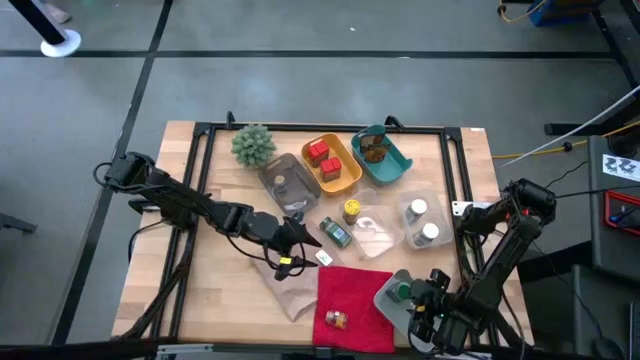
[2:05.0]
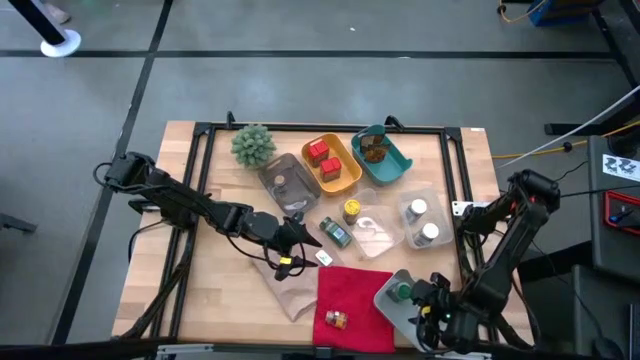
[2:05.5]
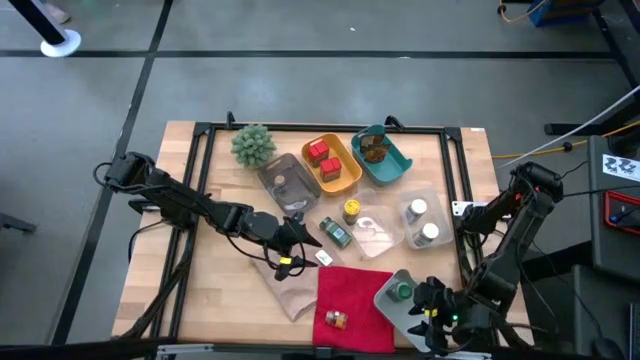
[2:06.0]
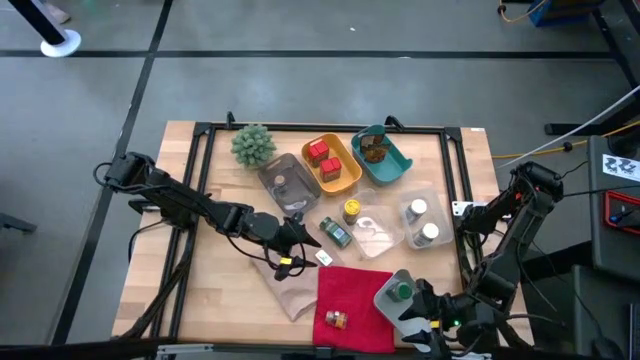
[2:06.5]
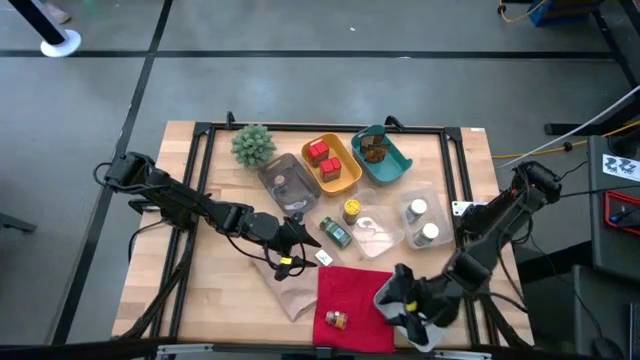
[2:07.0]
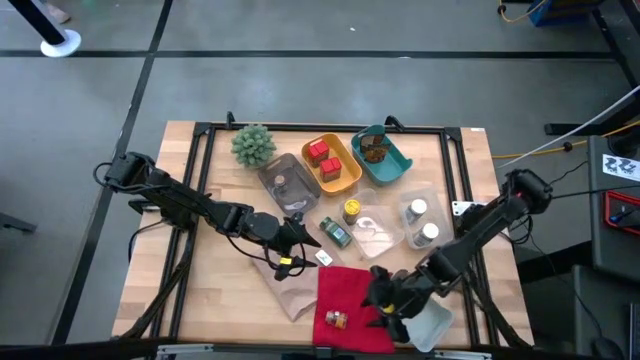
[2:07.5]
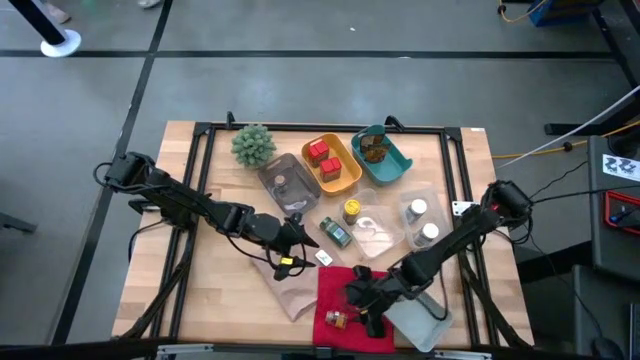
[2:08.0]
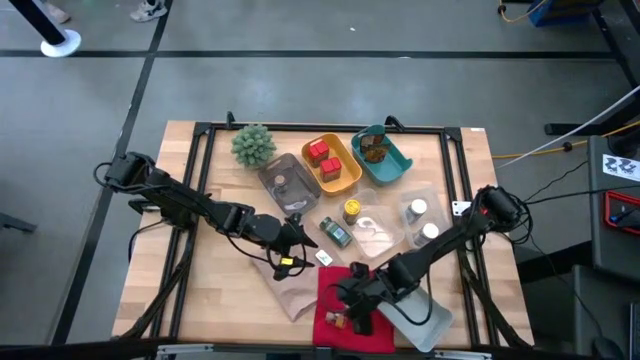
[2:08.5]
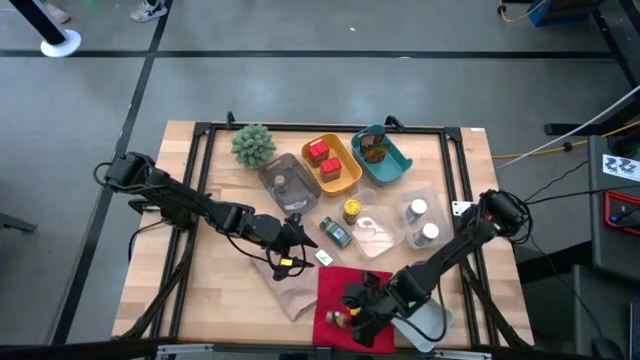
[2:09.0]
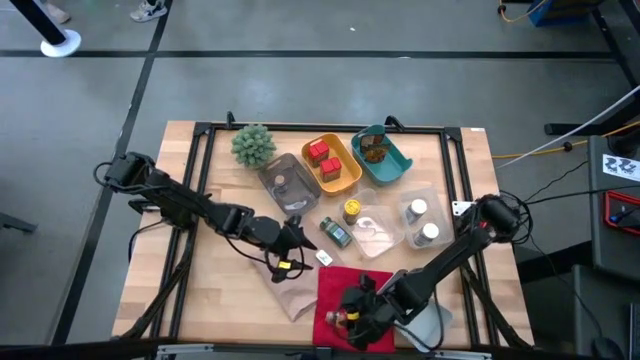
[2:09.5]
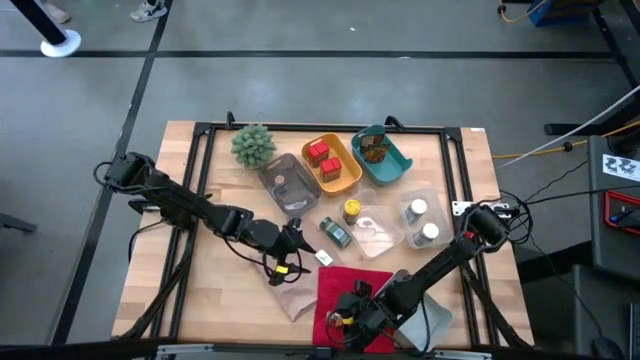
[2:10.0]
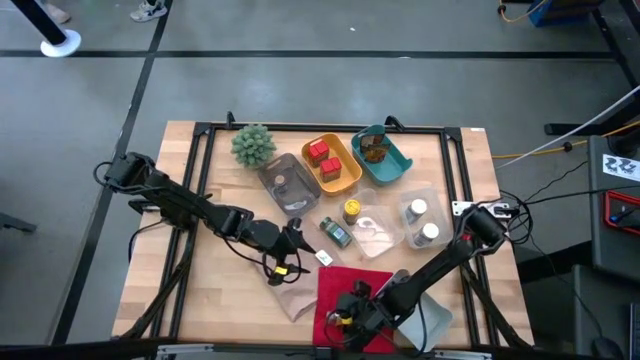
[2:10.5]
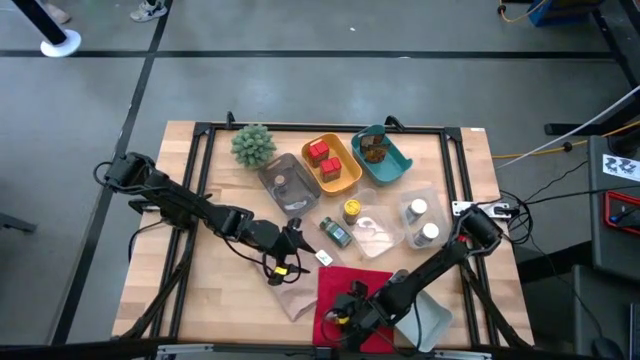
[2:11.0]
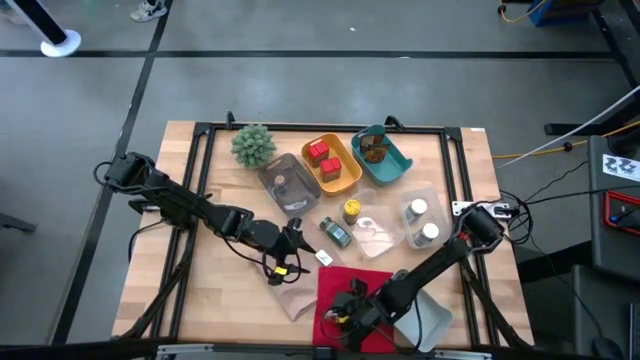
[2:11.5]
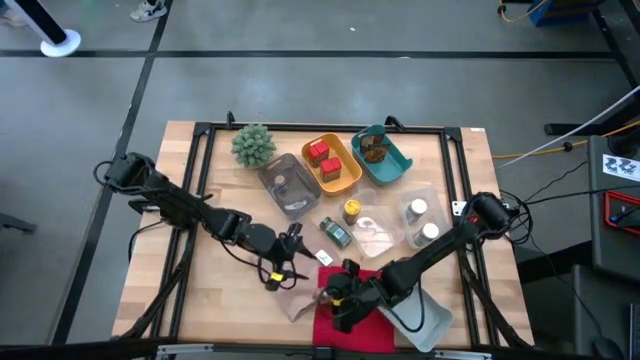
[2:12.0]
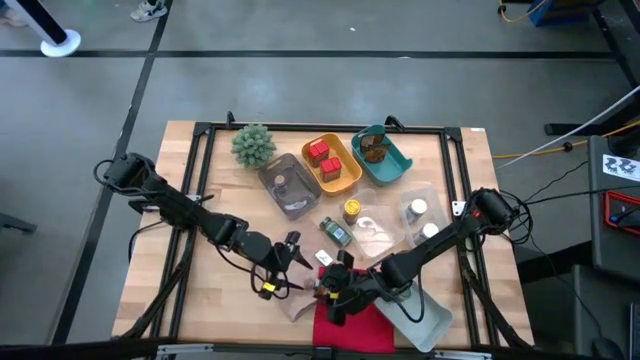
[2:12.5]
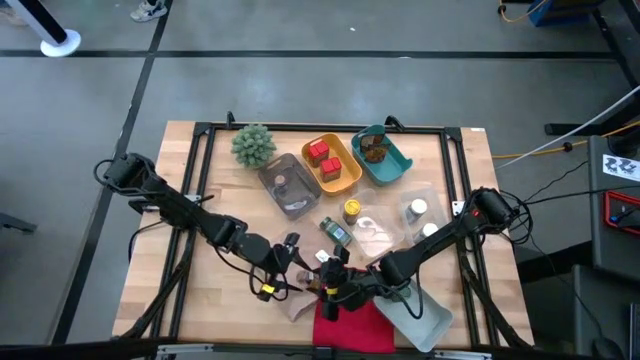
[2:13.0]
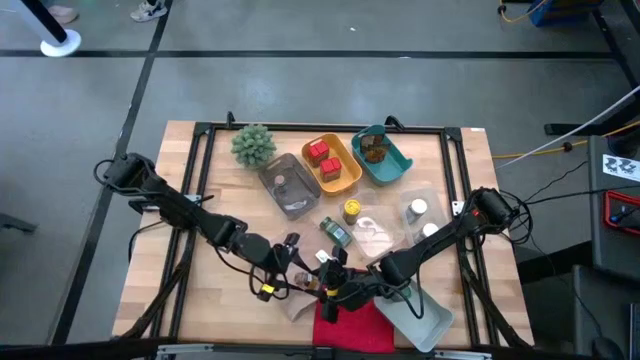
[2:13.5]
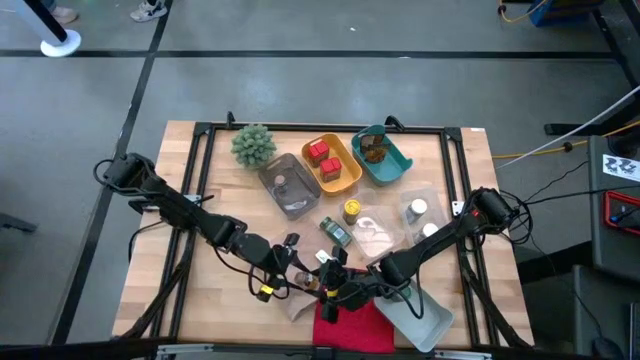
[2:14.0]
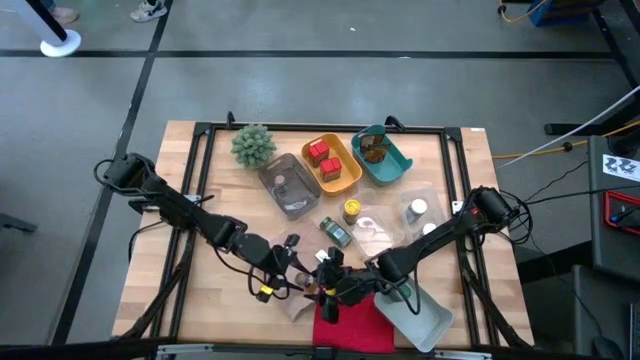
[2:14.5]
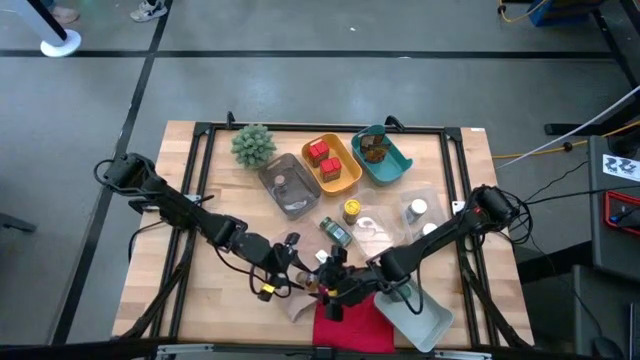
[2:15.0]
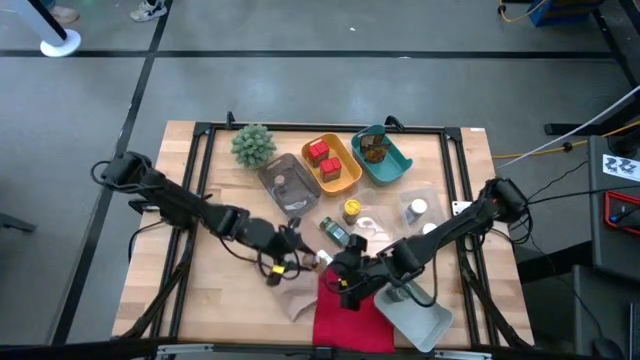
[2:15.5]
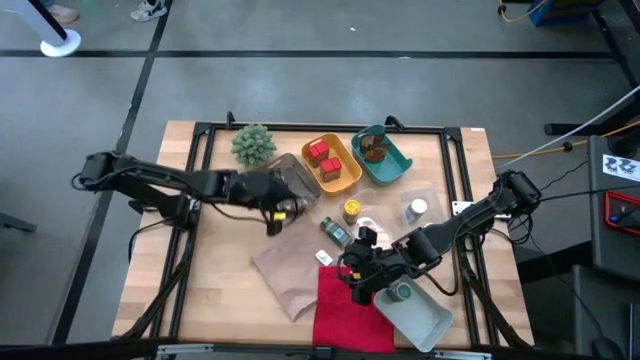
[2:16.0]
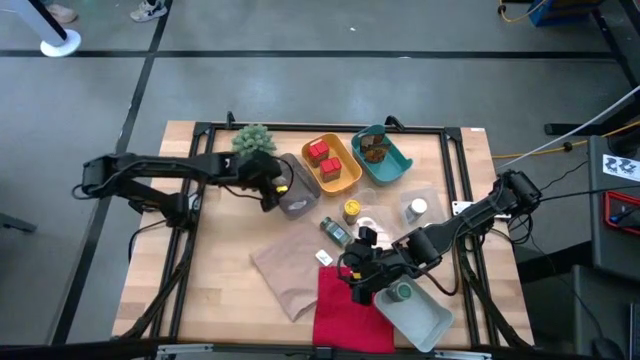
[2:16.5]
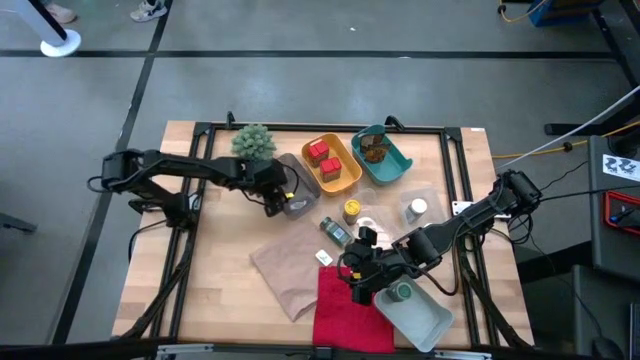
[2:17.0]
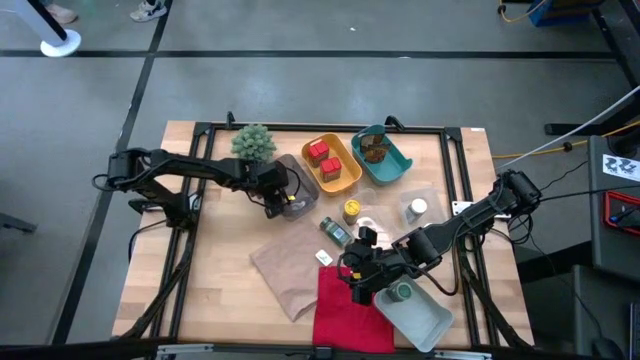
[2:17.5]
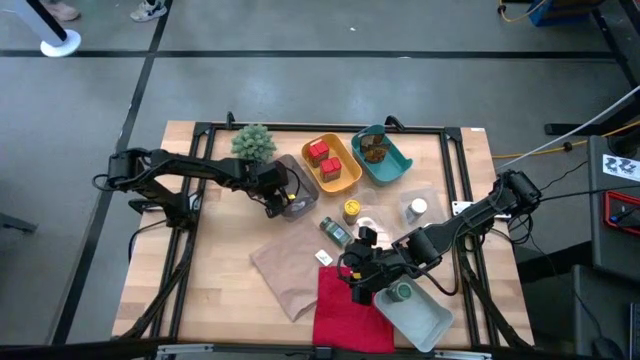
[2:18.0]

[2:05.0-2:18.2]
Task: Sort spices by type
Put the brown seasoning bottle into the black bin

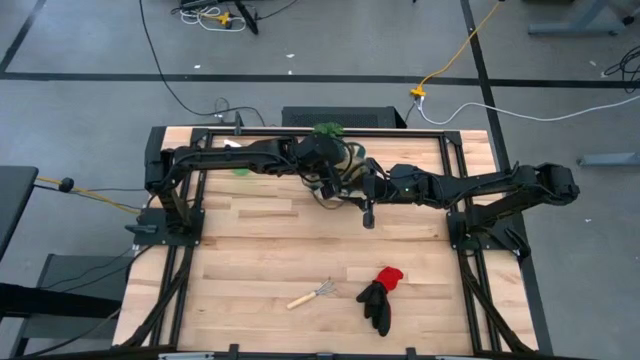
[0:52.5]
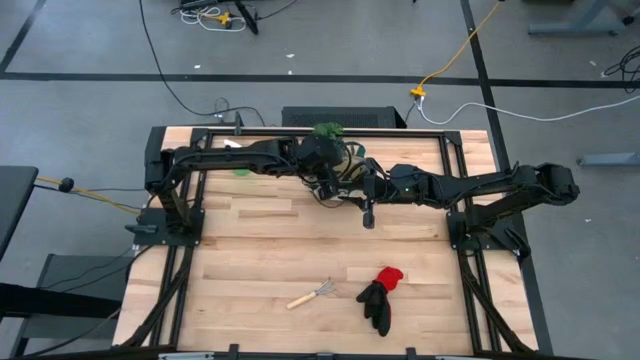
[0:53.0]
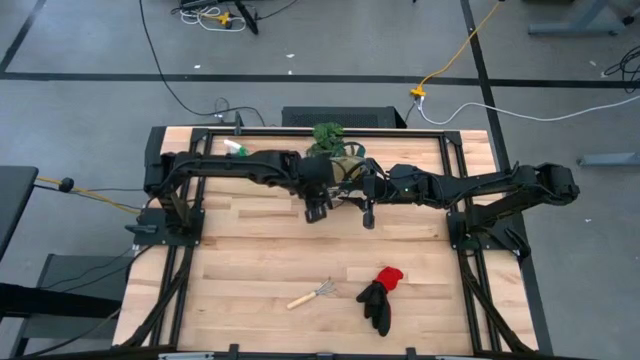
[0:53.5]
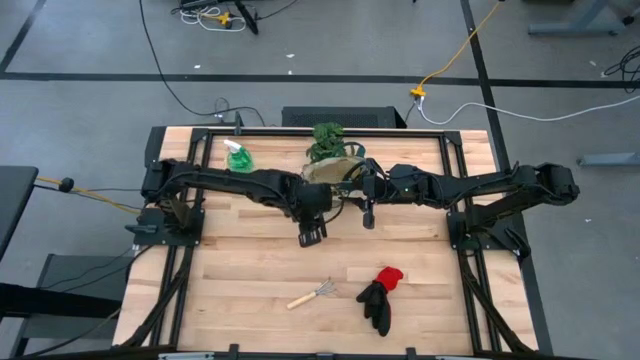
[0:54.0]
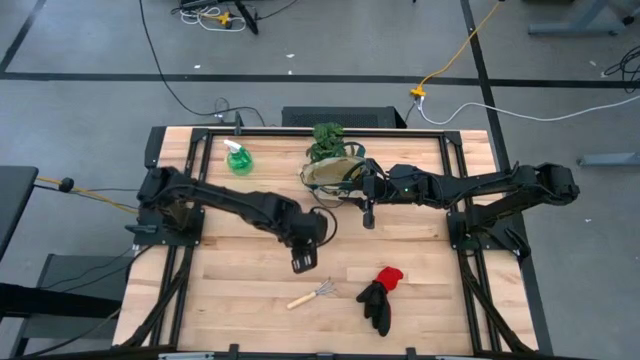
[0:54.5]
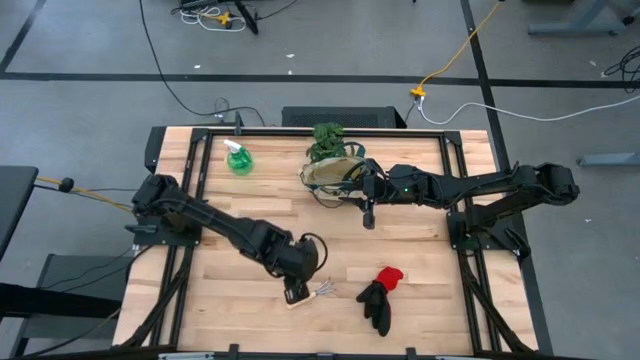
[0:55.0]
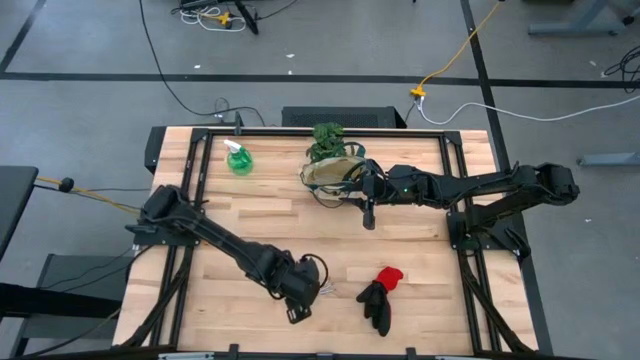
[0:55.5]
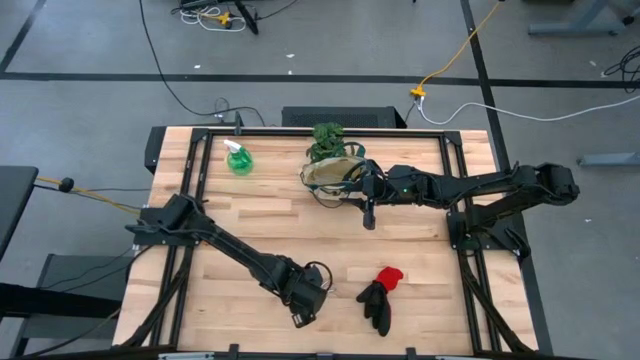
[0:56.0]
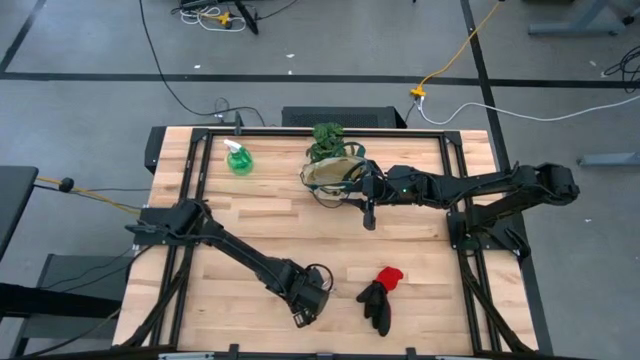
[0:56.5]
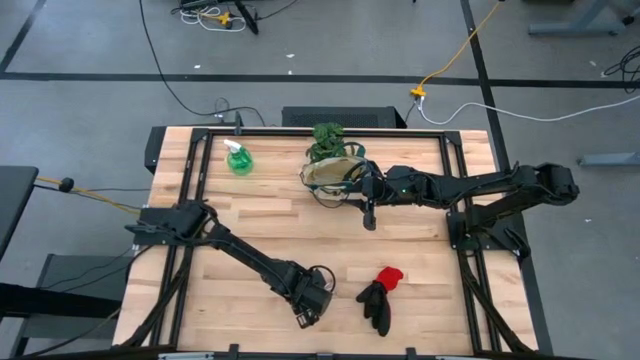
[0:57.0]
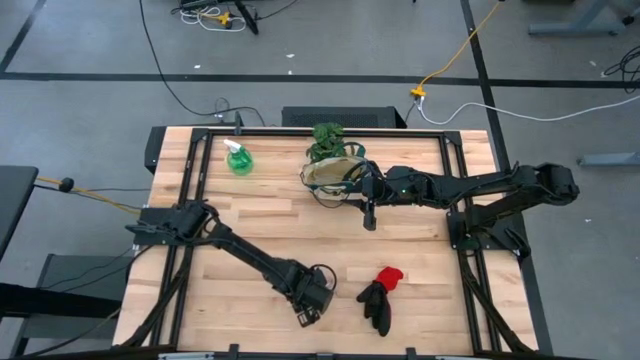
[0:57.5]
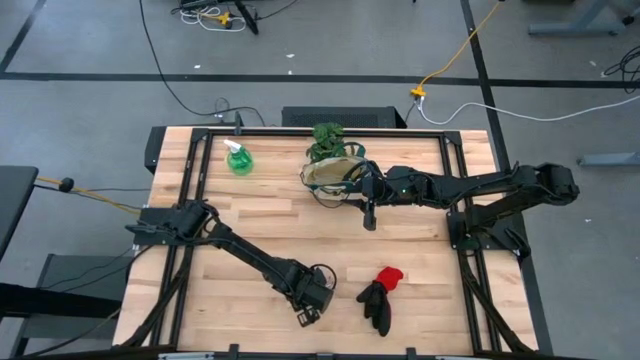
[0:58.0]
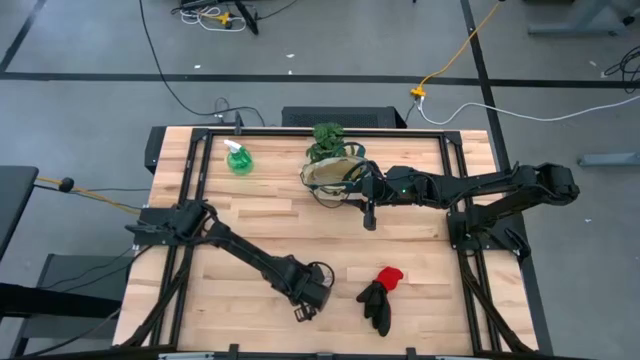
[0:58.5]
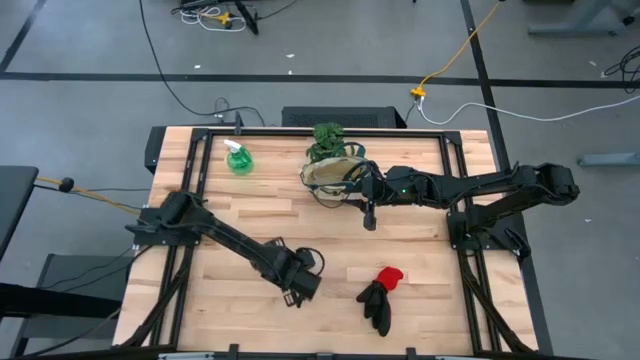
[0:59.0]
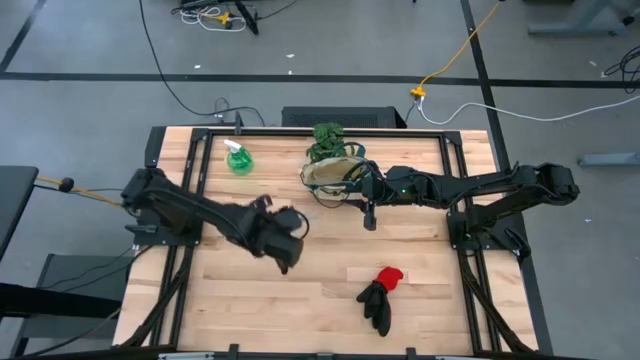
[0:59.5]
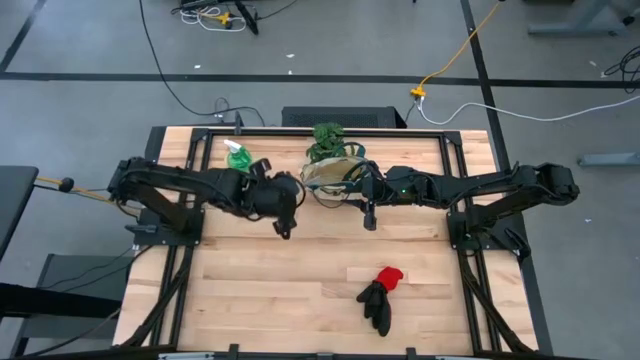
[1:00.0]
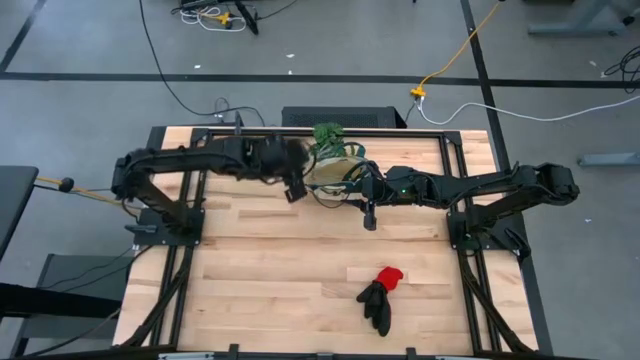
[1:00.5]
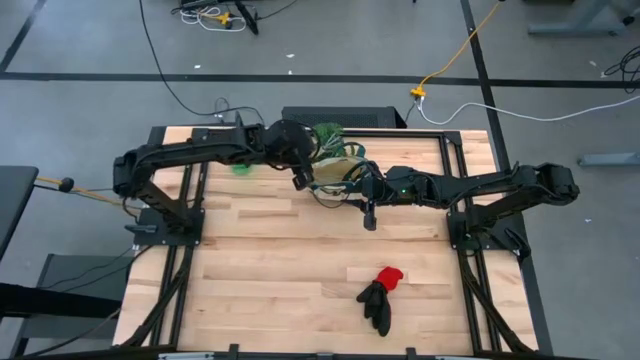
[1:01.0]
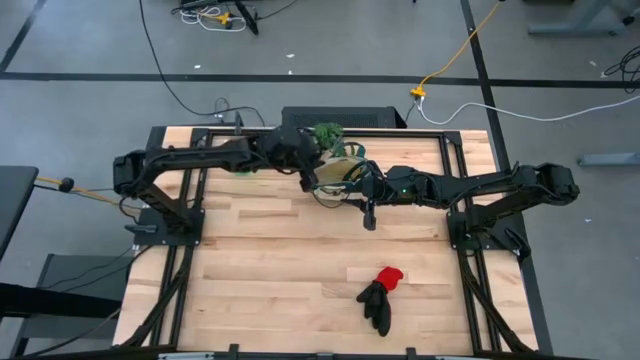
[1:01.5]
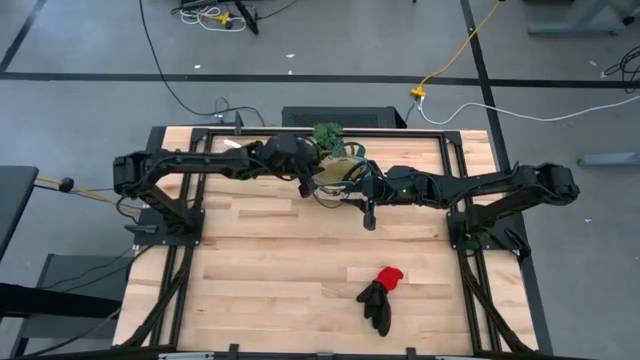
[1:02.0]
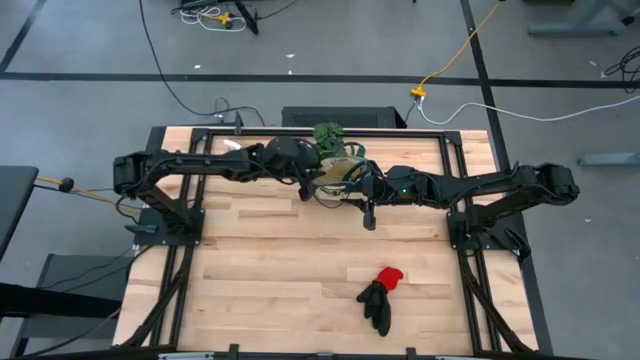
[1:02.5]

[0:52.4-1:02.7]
Task: Pick & Place Garden tools in Gardening bag
Put the brown hand rake into the green gardening bag
